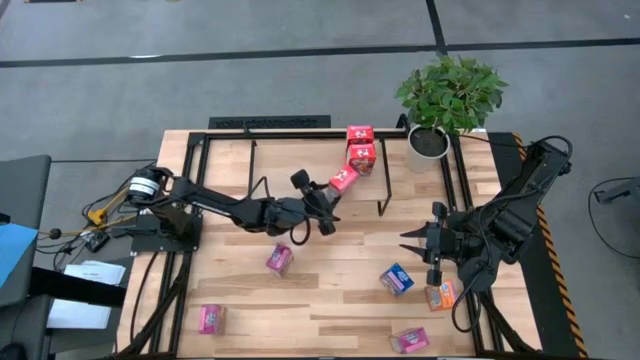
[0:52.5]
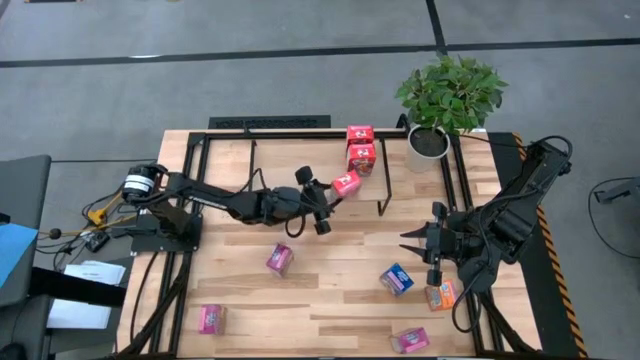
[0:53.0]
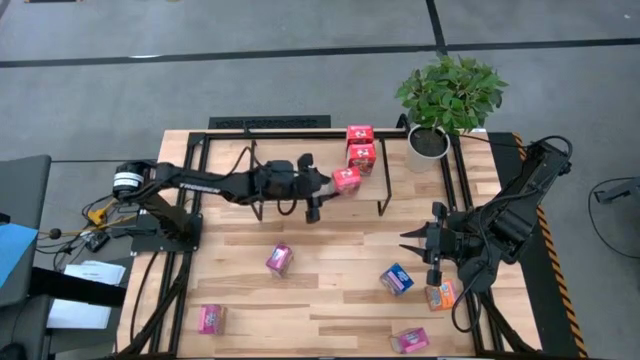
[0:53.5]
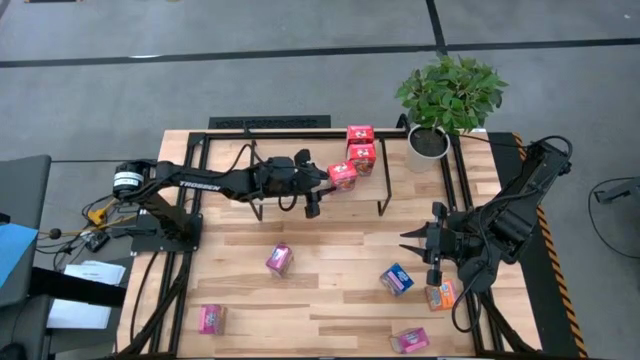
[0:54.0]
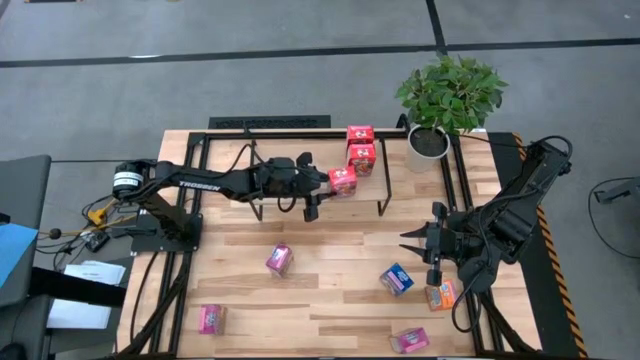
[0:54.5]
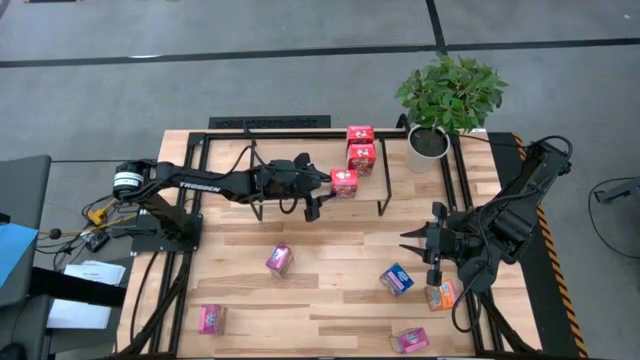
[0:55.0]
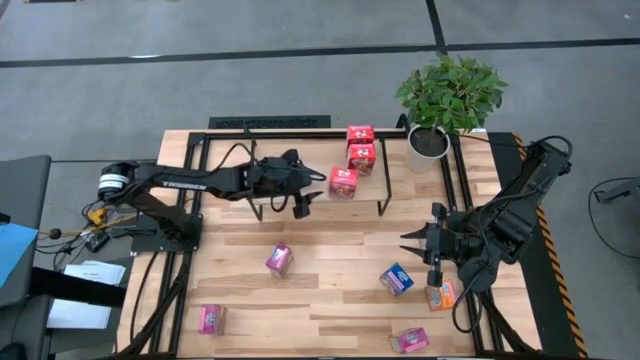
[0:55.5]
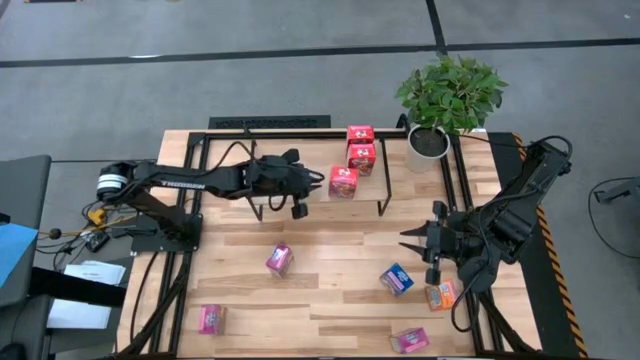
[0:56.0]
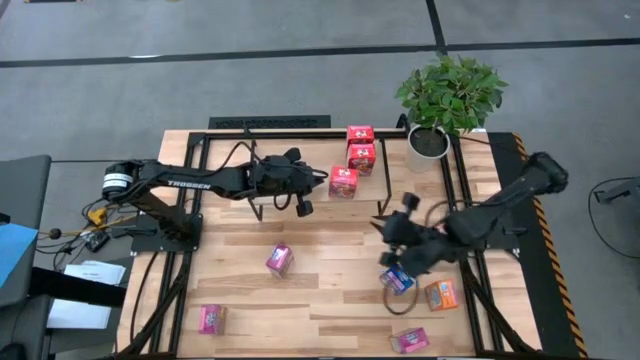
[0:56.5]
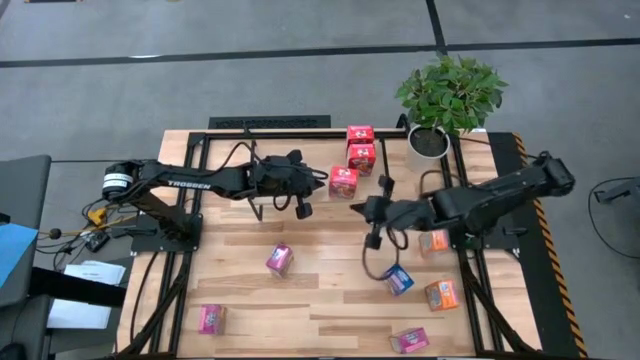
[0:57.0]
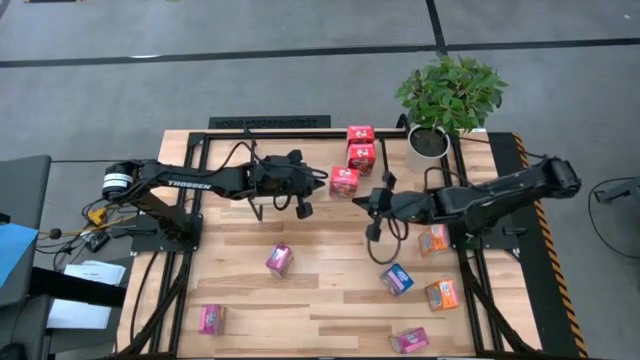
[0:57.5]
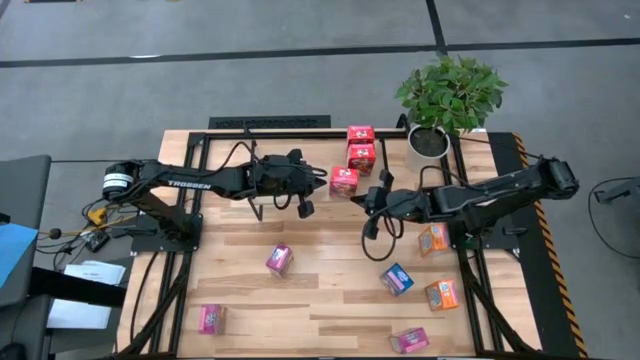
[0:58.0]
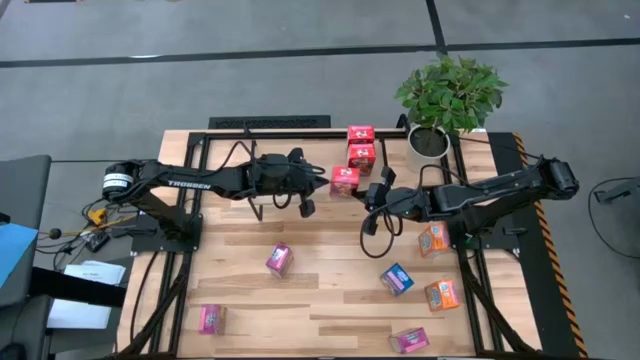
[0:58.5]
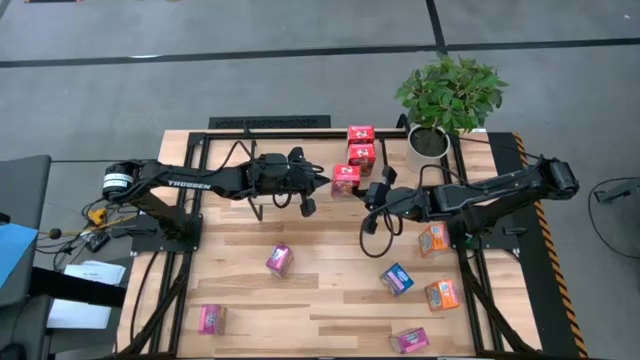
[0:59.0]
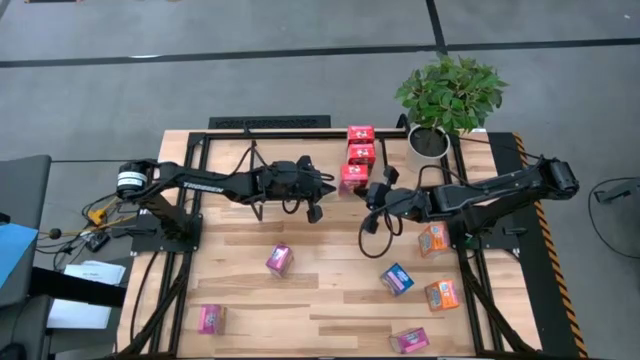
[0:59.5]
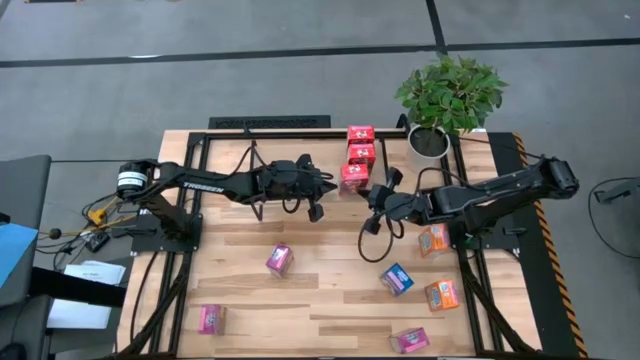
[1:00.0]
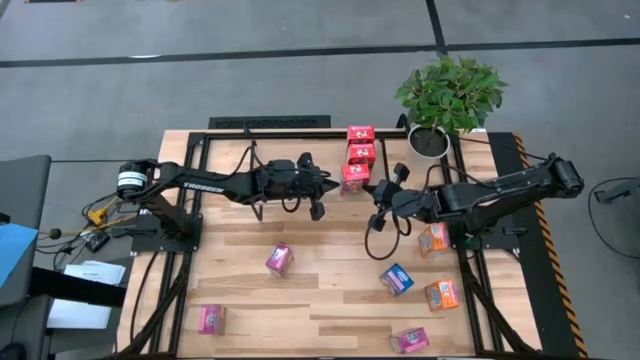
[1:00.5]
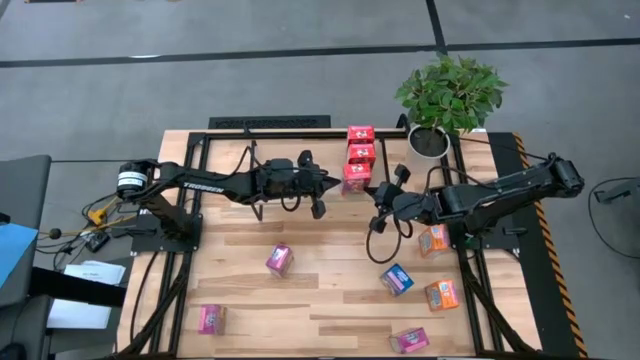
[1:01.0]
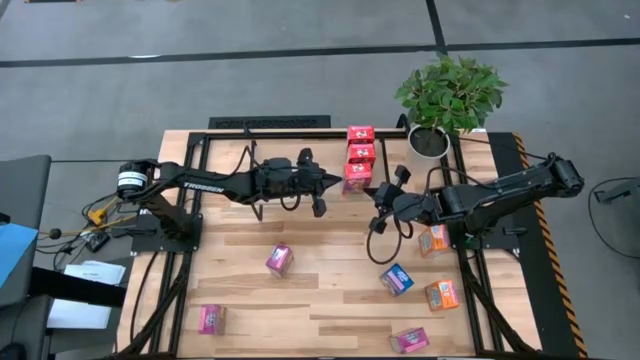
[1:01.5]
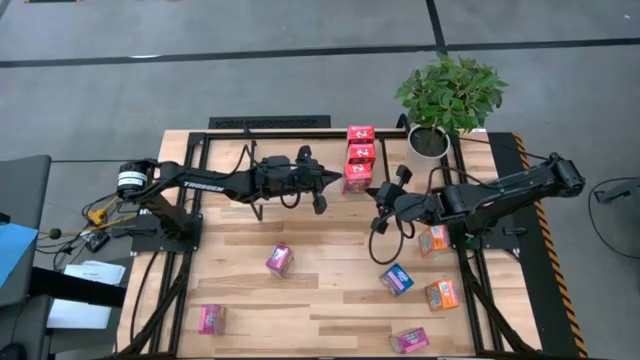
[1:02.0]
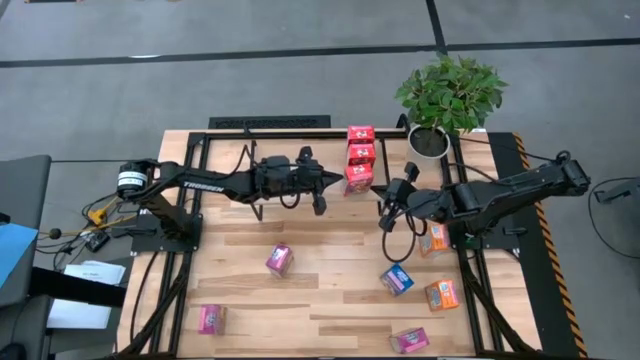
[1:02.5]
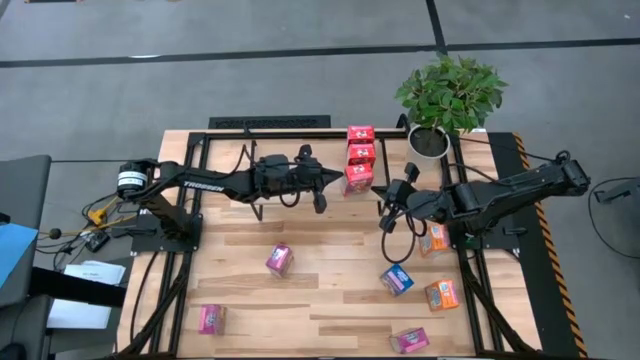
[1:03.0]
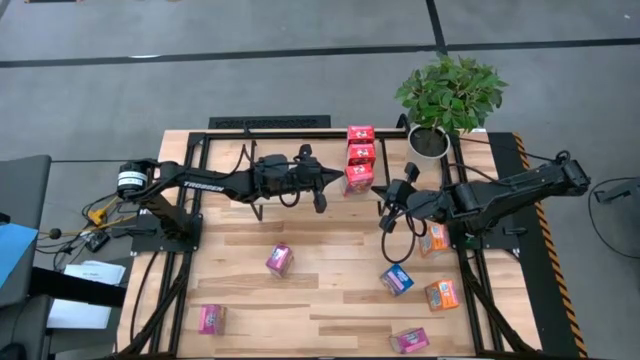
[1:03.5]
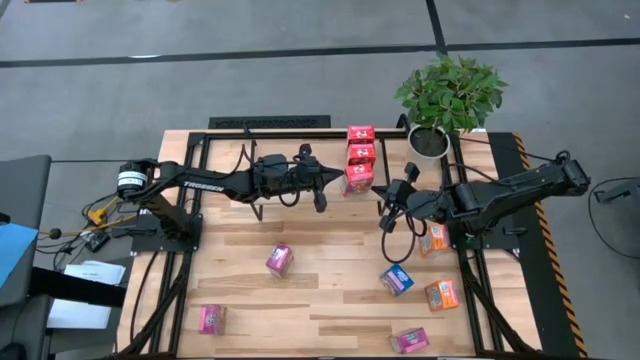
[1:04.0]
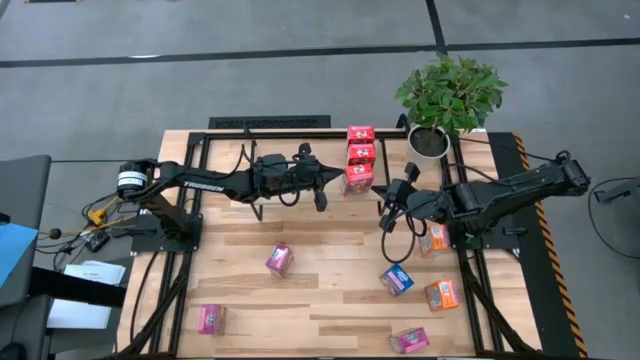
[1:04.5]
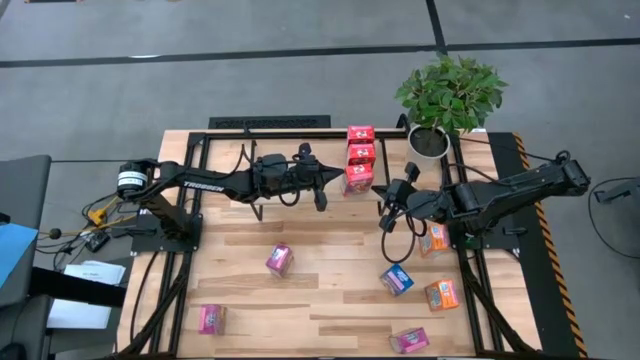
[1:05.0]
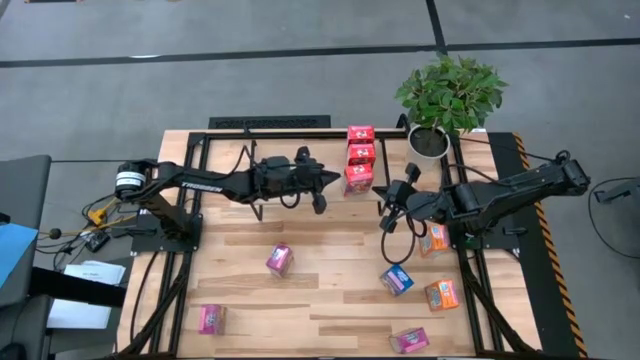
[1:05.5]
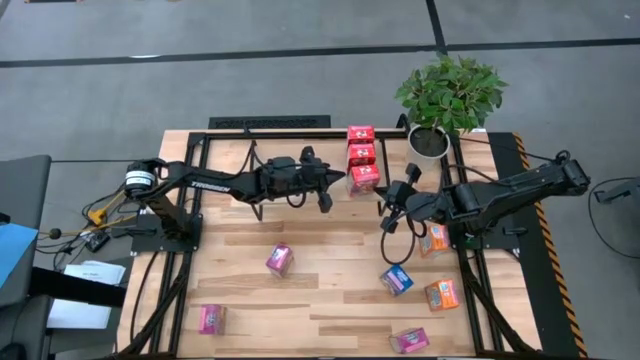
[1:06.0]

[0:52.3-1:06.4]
Task: Stack cereal on shelf
Put the red cereal box on the shelf aligned with the other red cereal boxes

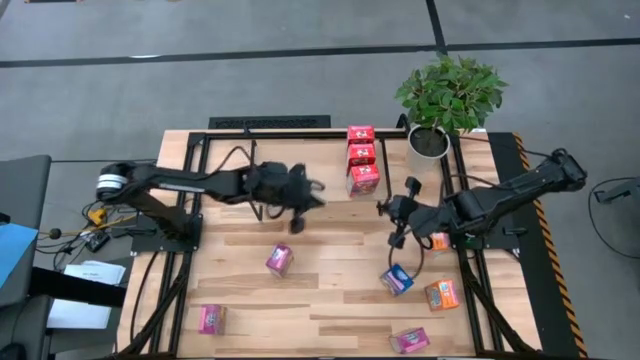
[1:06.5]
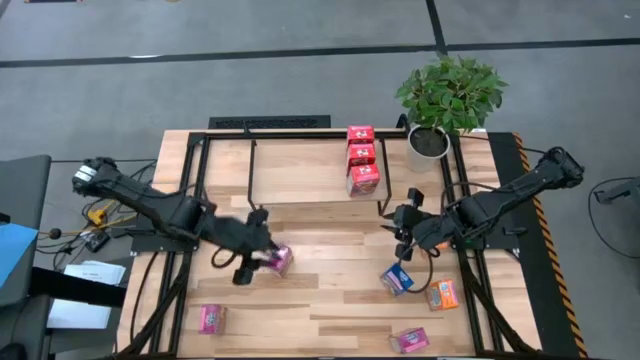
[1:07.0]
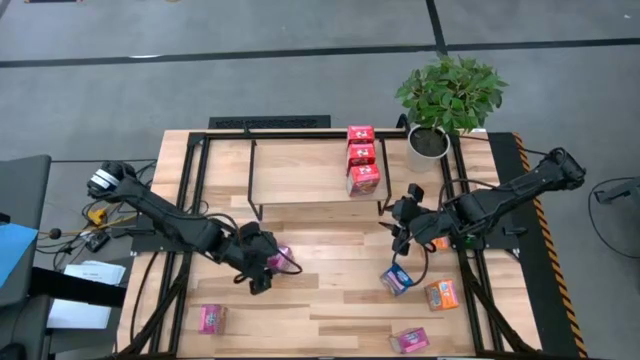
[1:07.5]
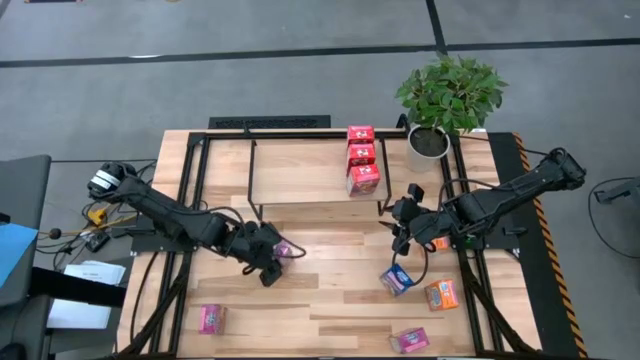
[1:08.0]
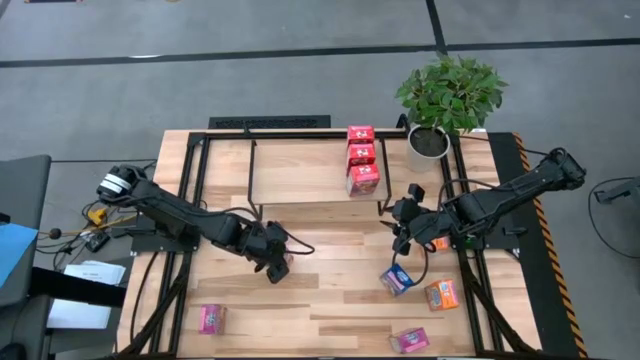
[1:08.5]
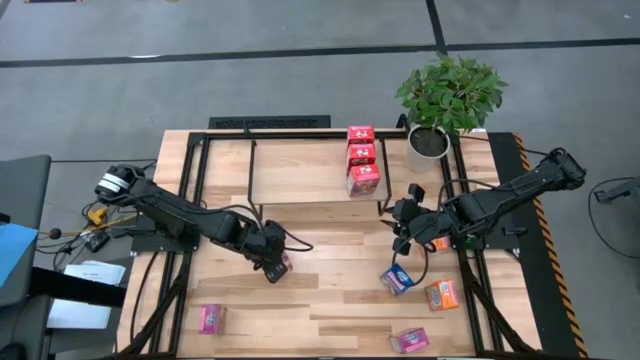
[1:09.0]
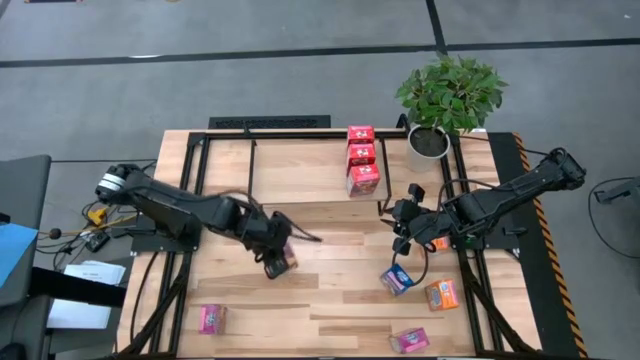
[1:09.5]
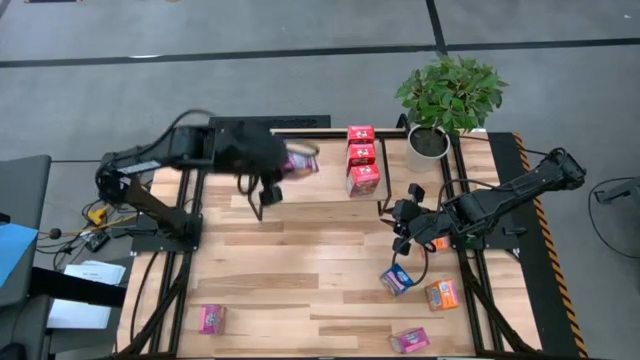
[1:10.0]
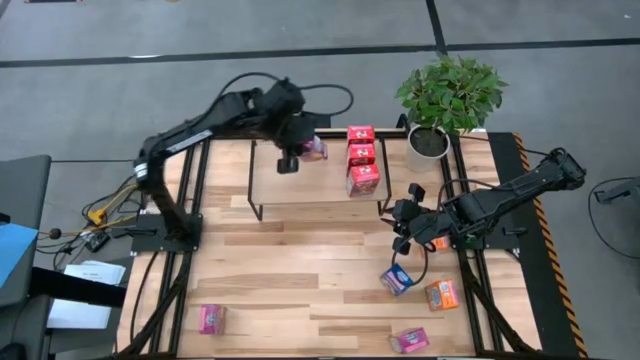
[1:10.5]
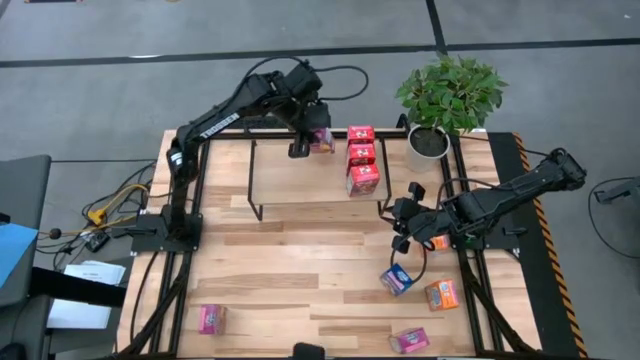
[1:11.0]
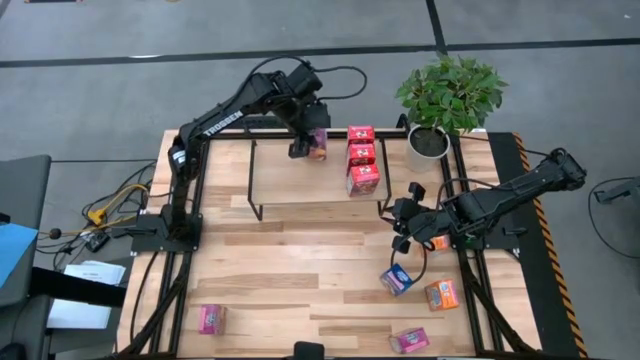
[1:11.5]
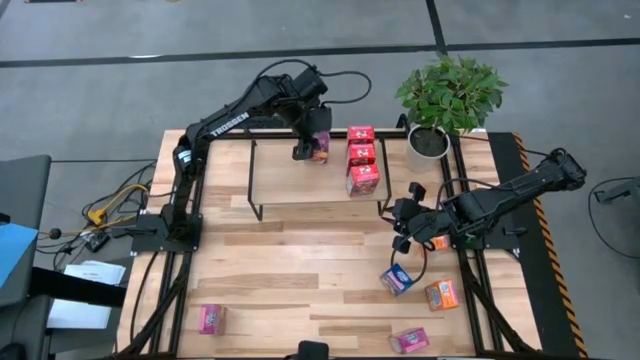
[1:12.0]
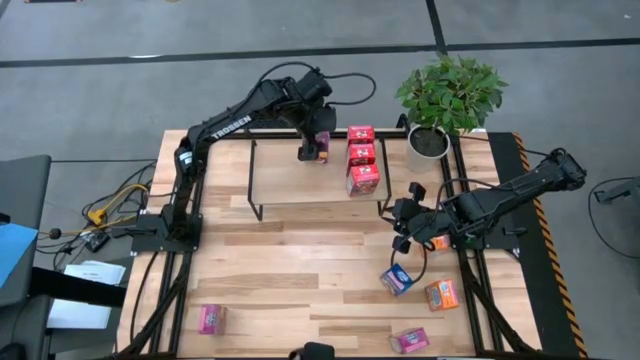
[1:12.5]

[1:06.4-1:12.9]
Put the top purple cereal box on the shelf

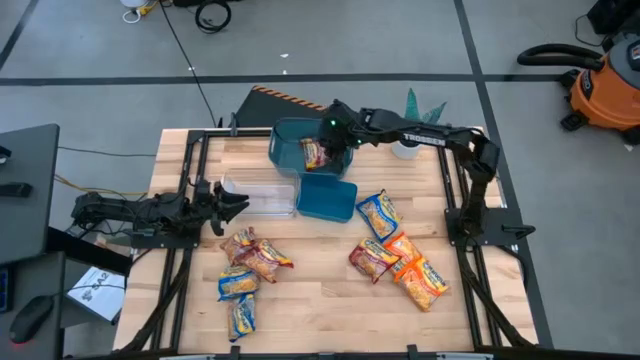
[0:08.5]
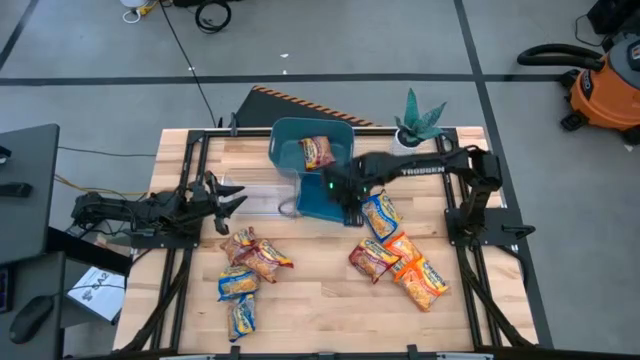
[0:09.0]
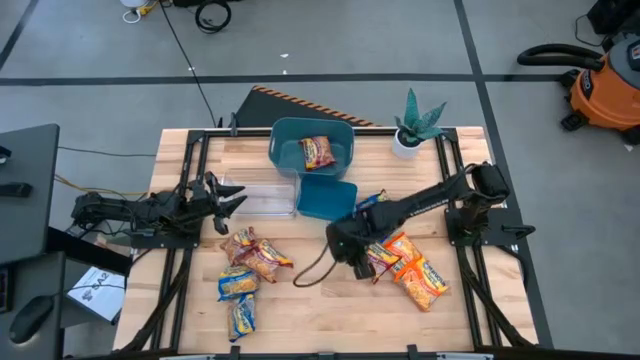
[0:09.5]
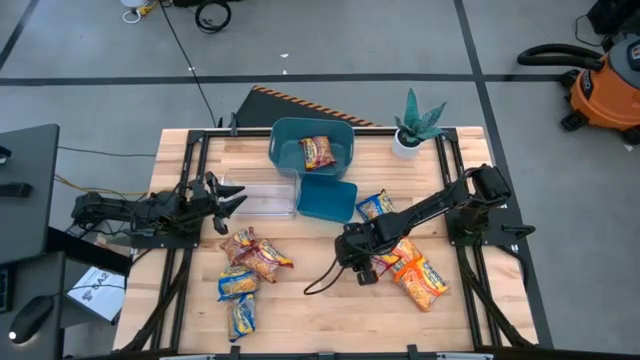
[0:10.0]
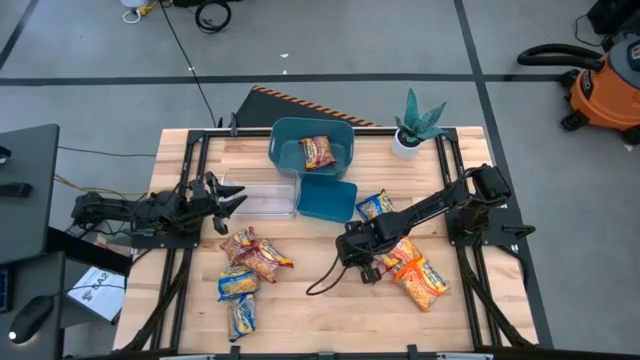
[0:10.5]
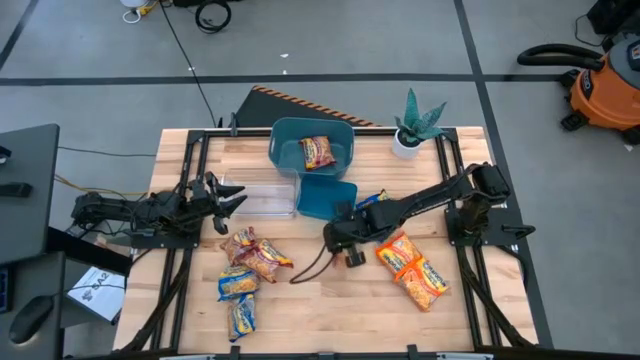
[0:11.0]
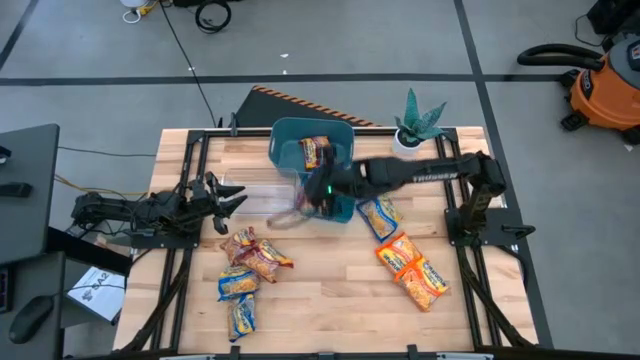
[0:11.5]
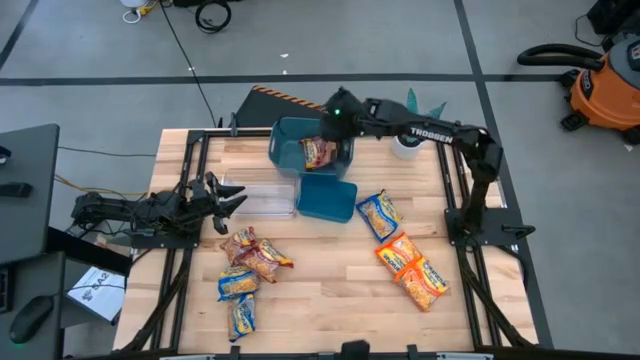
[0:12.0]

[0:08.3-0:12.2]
Task: Sort Maruchan noodles
Put the red noodle pack into the green bin
